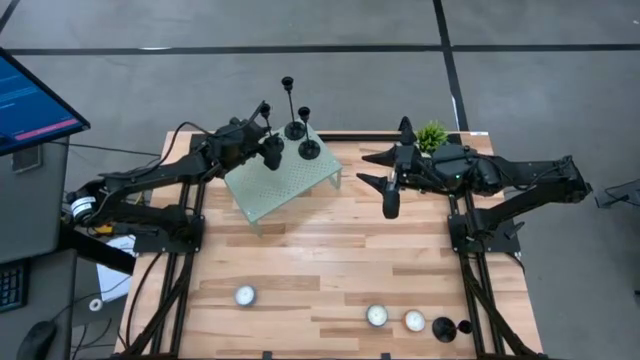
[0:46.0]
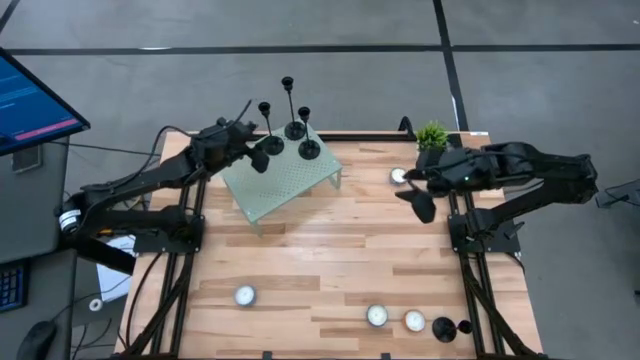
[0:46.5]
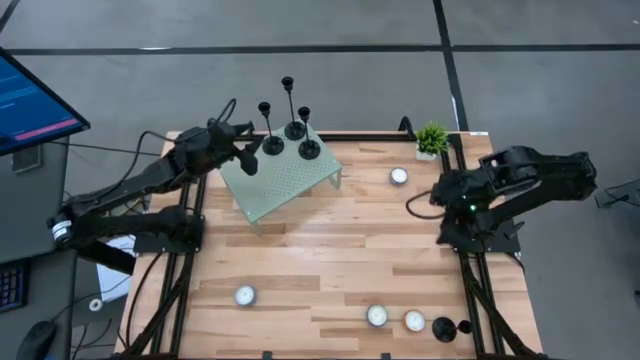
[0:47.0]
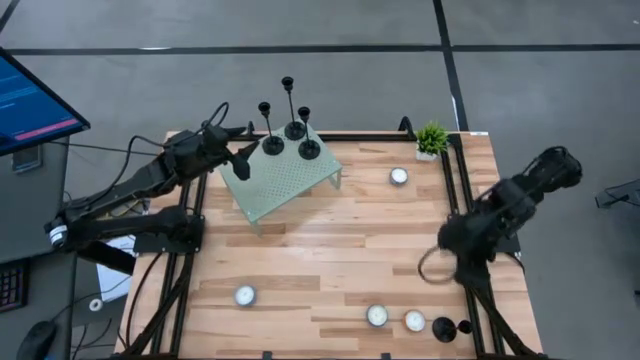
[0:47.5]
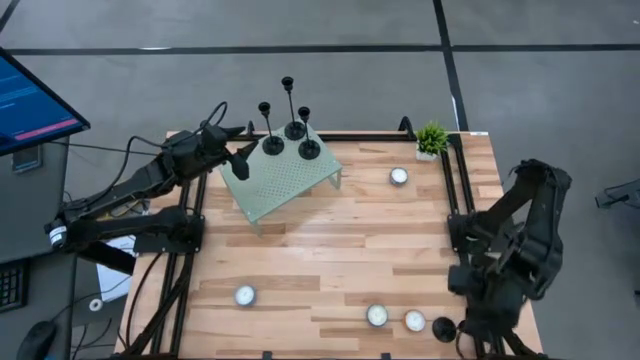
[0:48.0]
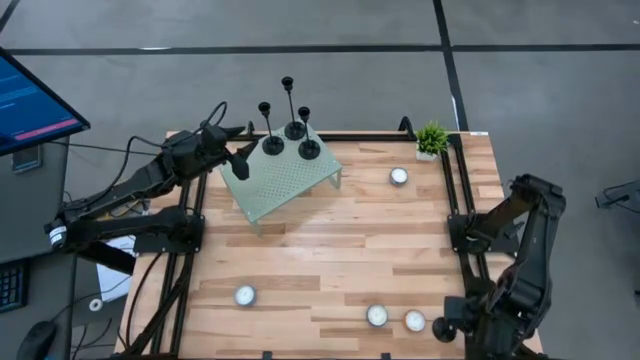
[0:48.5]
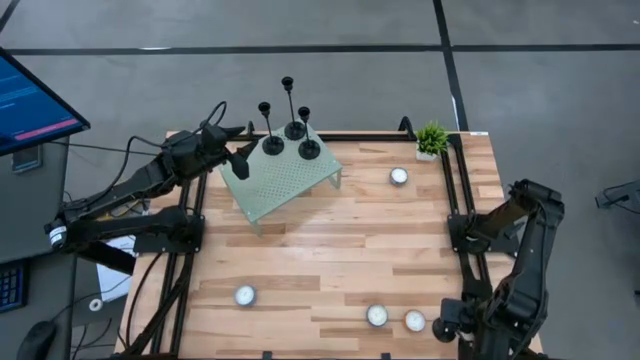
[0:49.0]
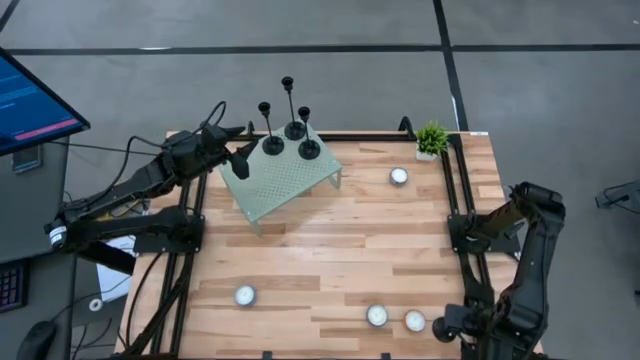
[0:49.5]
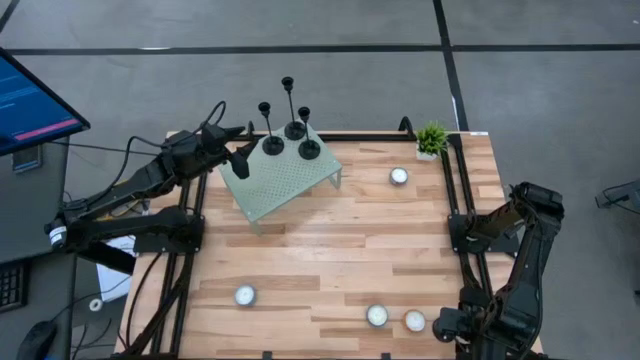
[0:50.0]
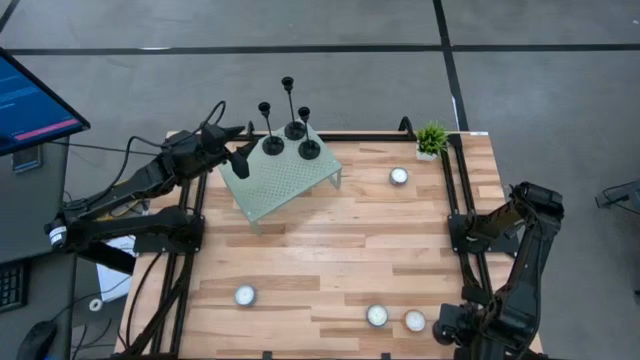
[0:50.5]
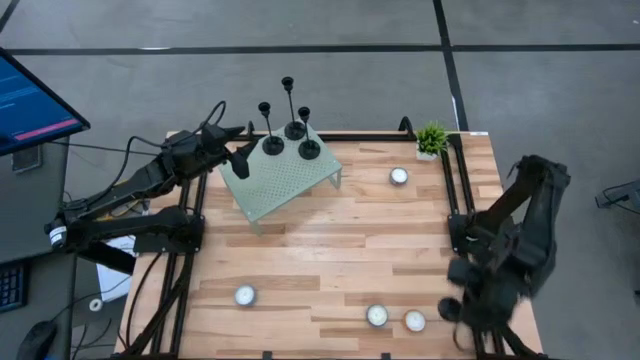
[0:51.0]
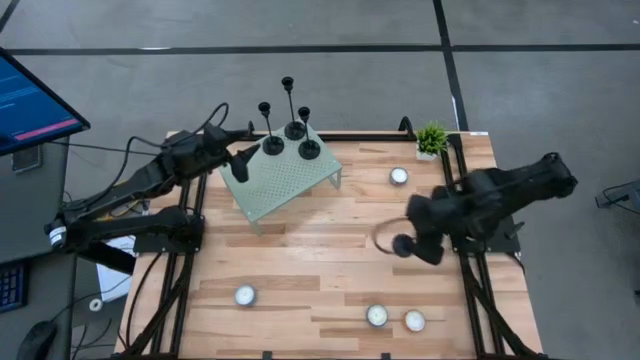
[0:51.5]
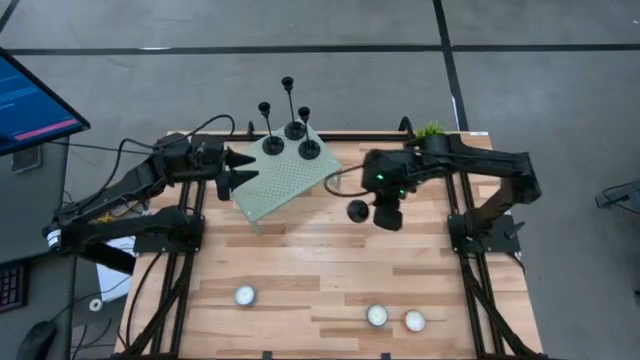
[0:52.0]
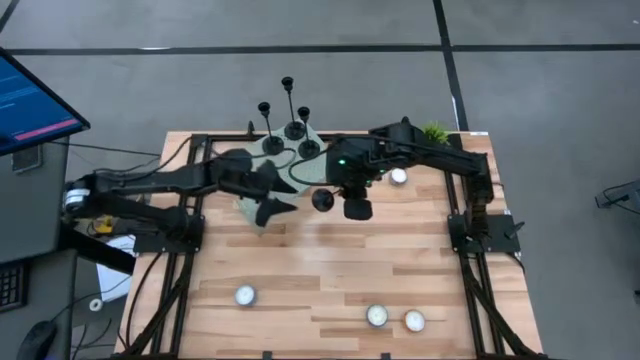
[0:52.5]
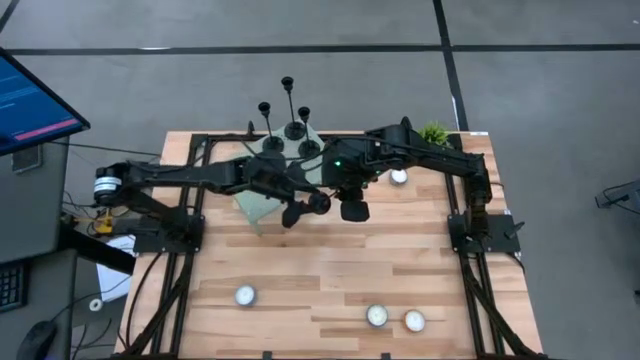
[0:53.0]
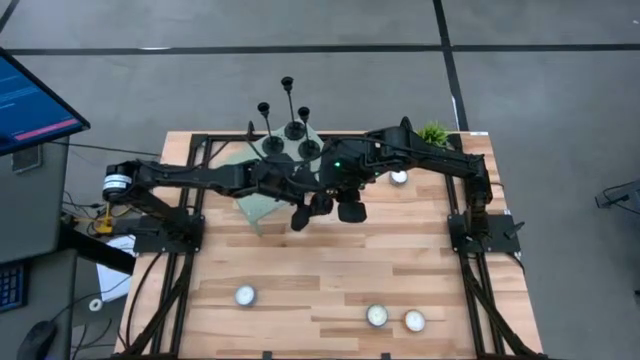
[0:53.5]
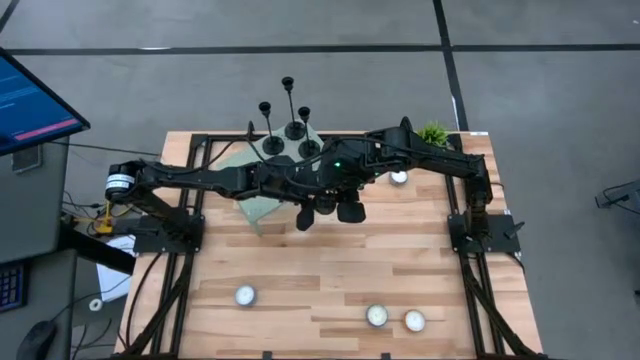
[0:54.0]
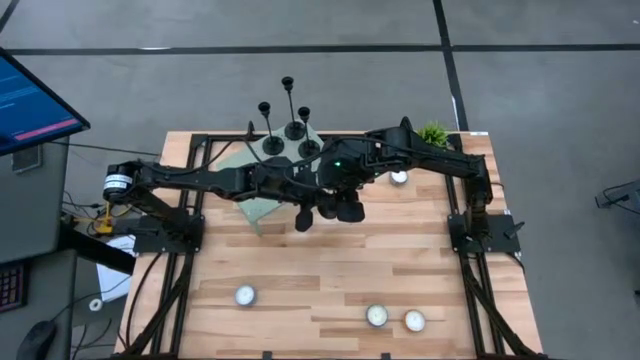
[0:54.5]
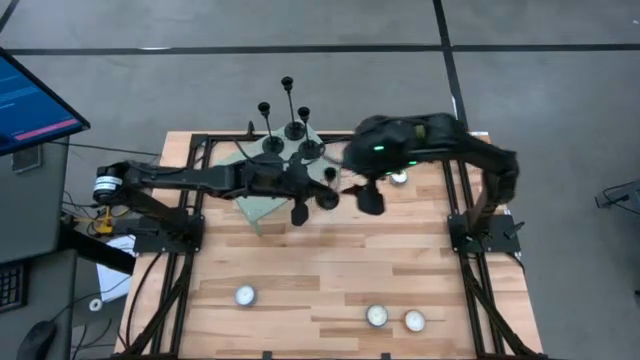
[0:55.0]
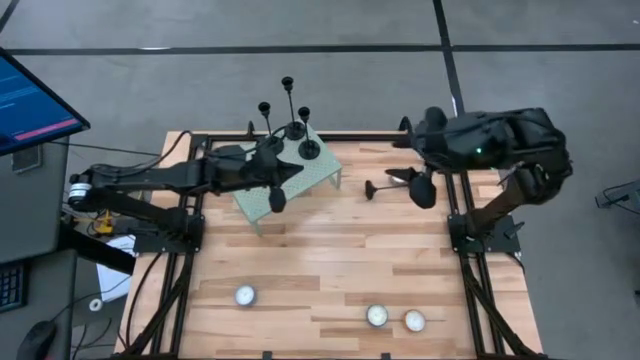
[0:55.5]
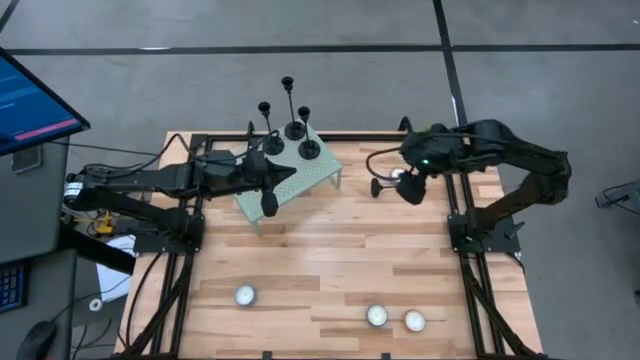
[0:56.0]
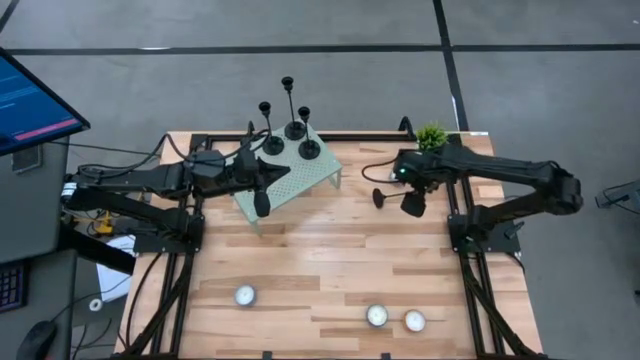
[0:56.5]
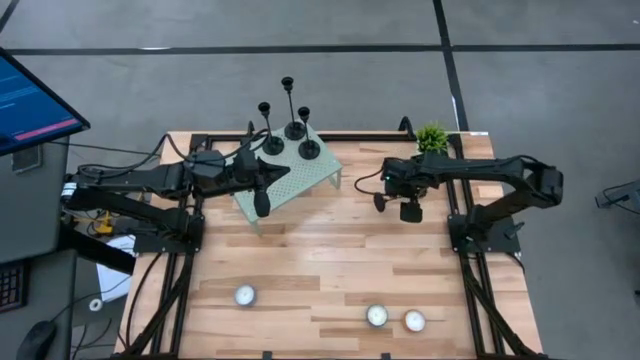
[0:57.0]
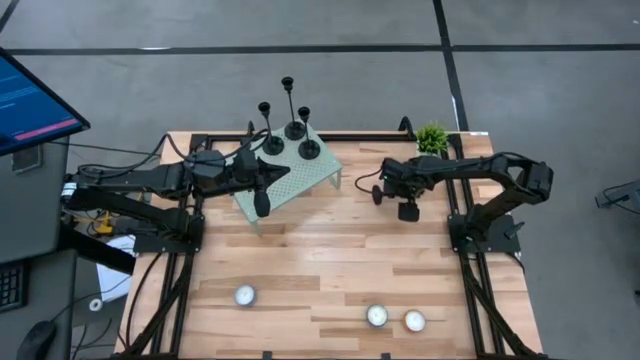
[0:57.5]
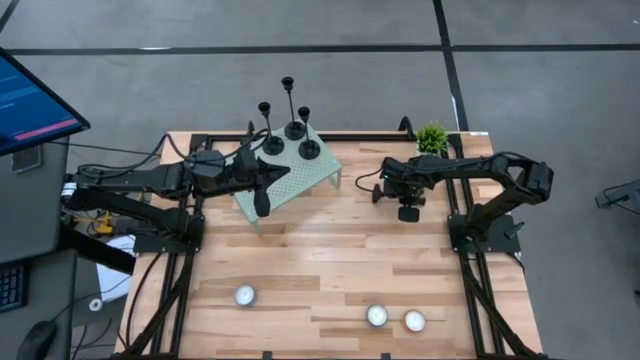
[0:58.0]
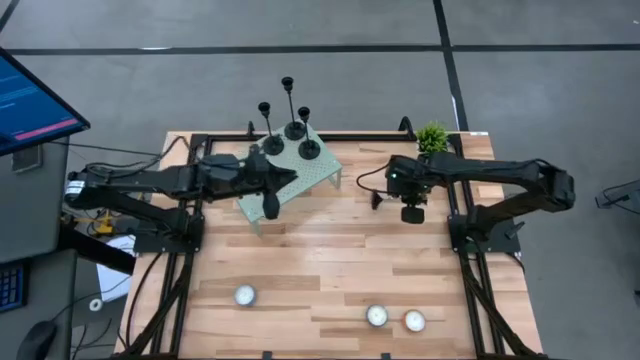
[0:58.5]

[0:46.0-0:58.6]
Task: Pick & Place candle stick holders
Align the black candle holder with the other black candle holder on the shelf

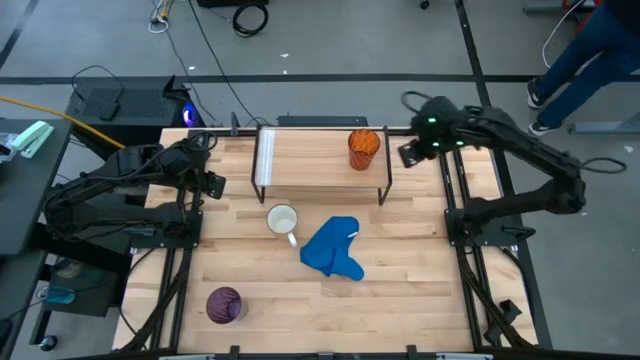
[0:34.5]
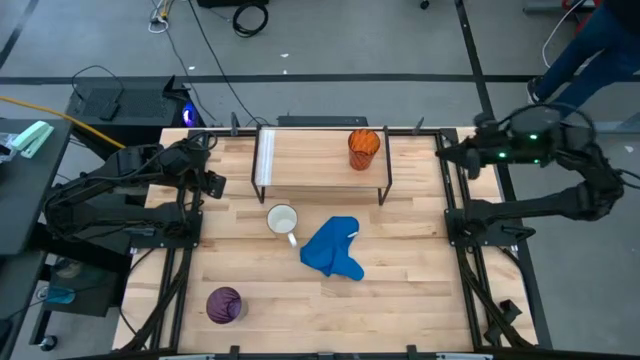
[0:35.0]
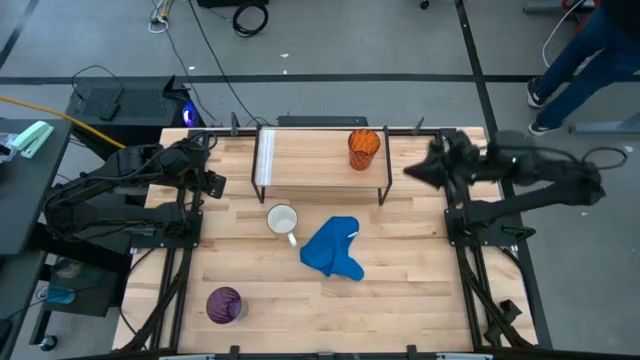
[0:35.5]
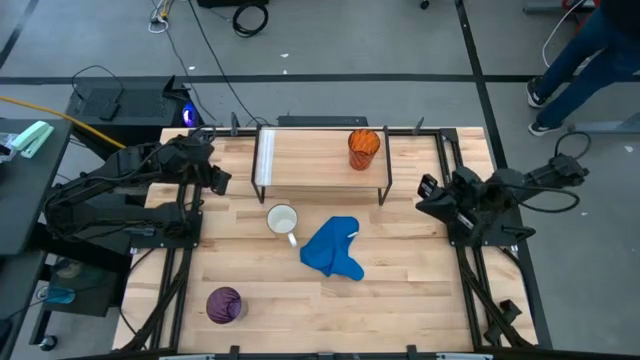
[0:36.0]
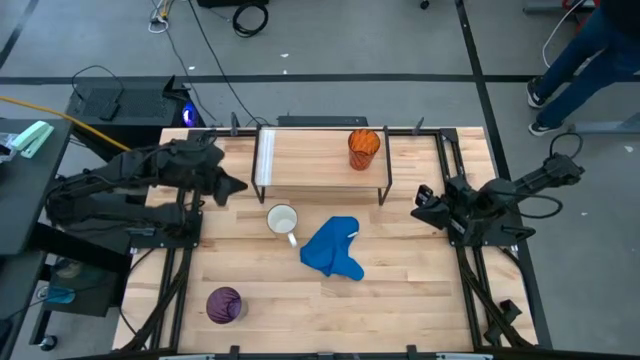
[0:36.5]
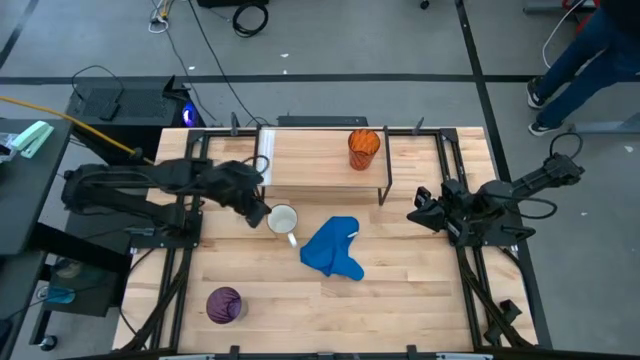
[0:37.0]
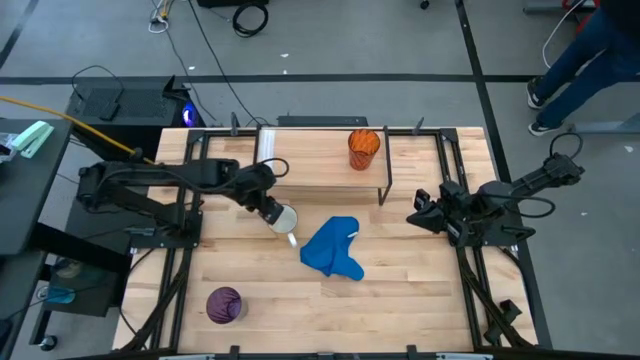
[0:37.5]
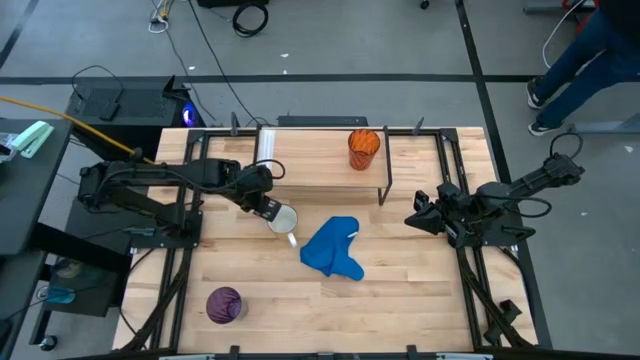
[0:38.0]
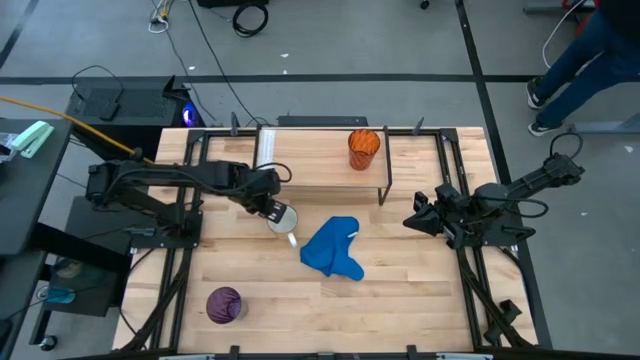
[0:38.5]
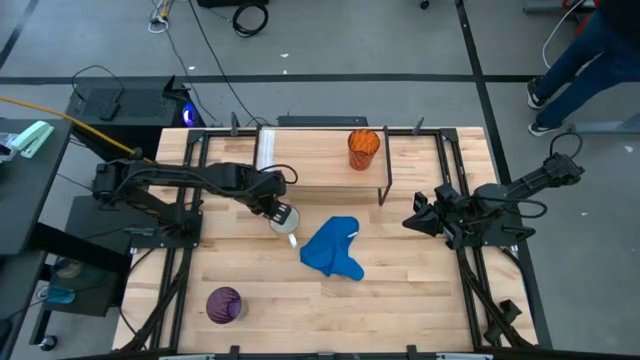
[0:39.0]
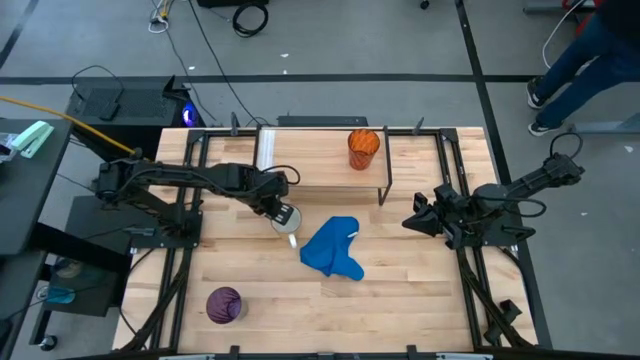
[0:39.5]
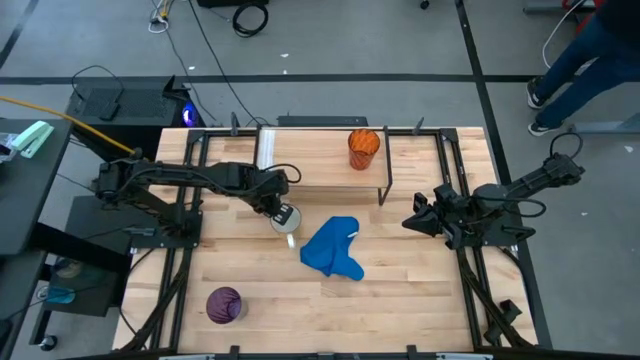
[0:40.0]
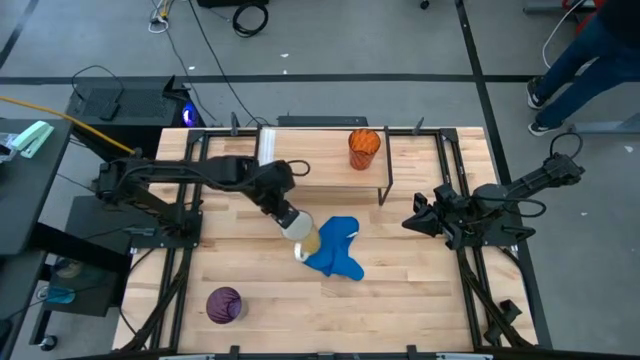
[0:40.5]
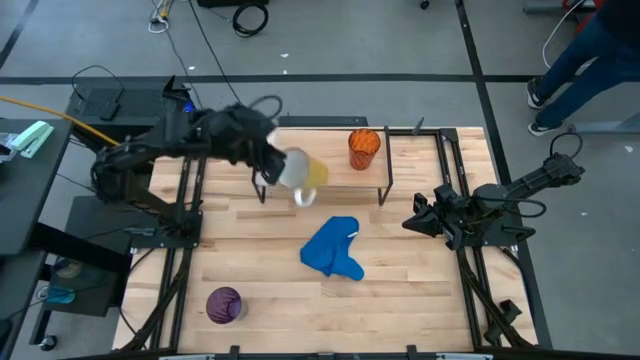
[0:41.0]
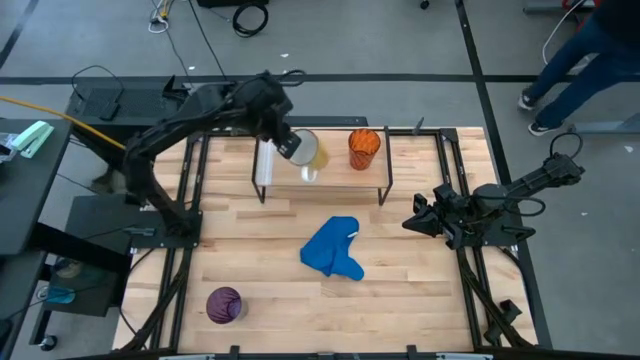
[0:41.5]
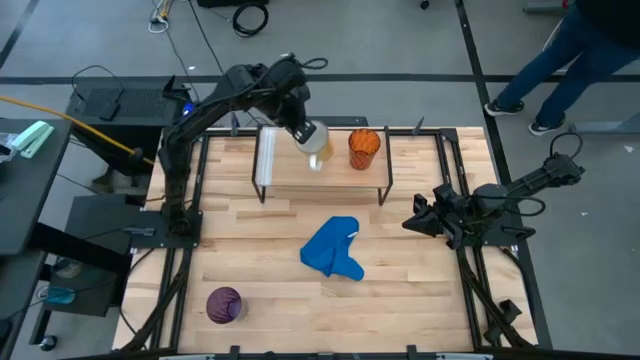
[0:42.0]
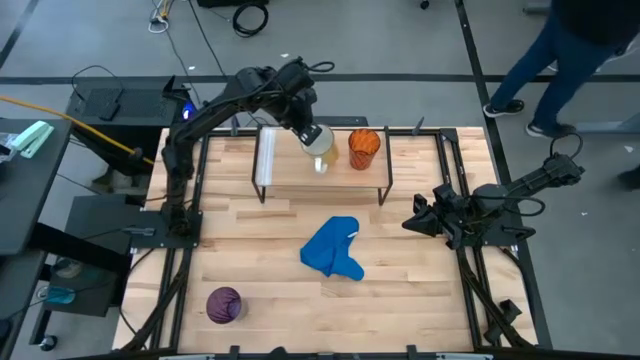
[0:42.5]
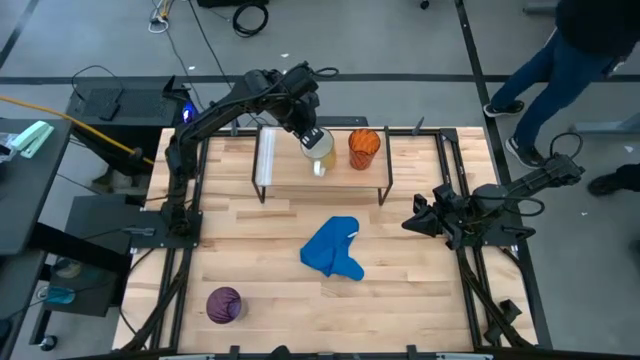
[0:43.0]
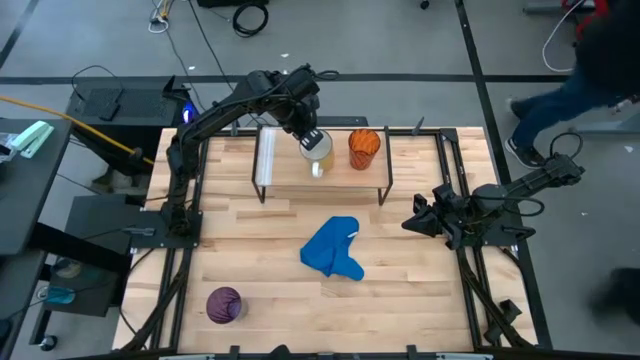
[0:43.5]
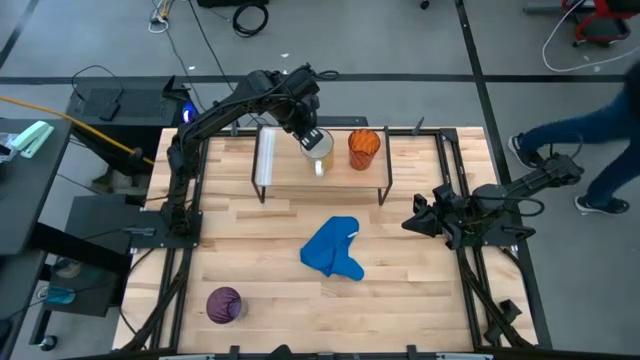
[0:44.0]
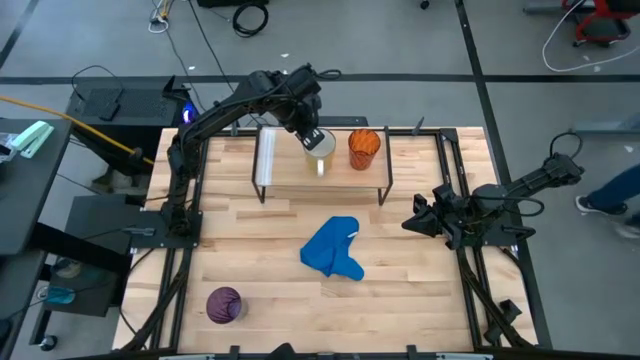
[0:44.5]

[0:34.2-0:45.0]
Task: Stack small to large cups/mugs on shelf
Put the yellow mug on the shelf
